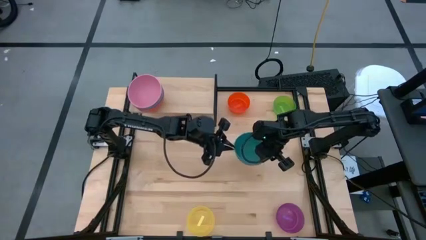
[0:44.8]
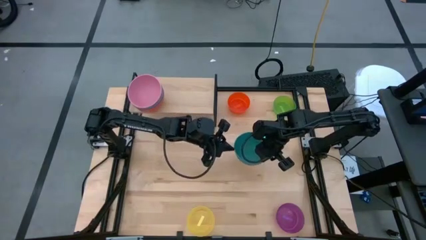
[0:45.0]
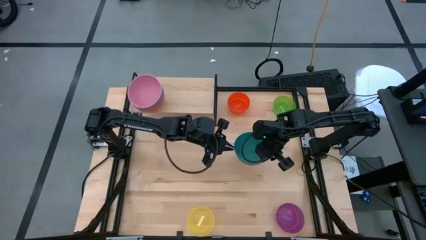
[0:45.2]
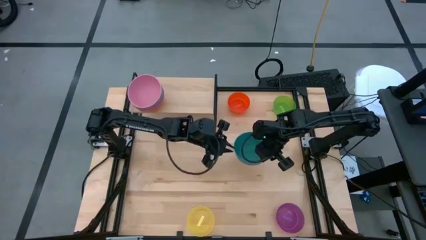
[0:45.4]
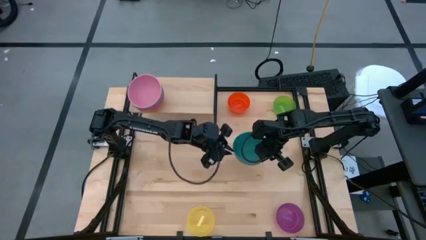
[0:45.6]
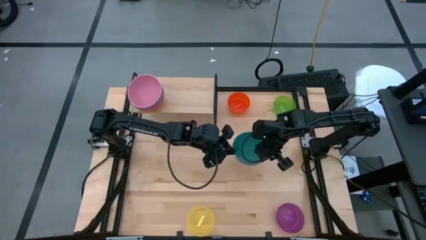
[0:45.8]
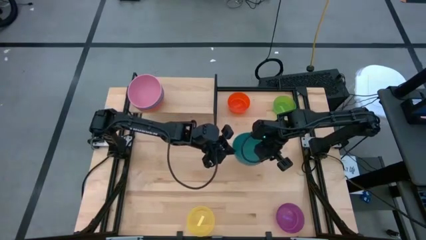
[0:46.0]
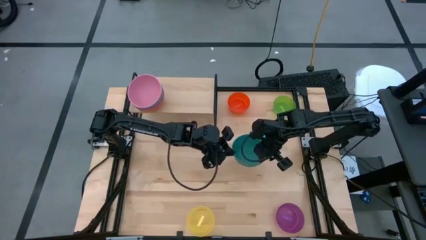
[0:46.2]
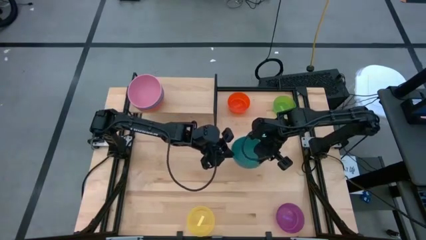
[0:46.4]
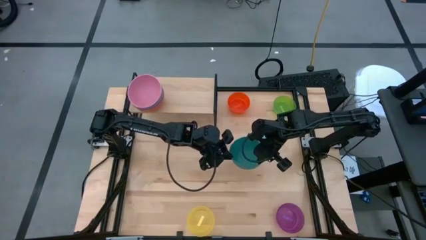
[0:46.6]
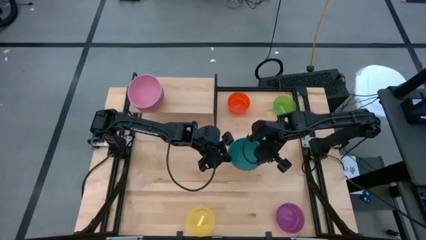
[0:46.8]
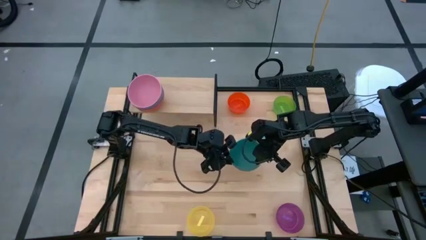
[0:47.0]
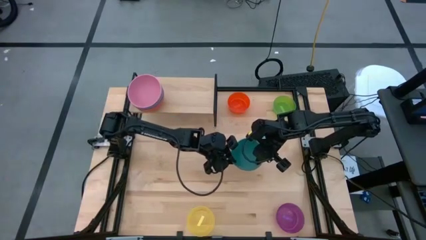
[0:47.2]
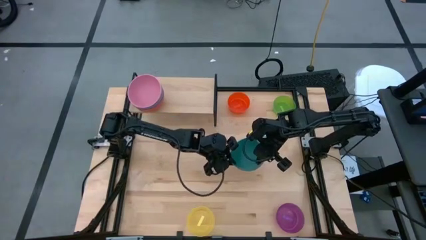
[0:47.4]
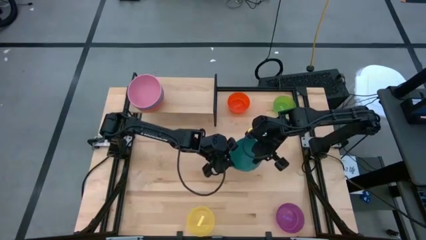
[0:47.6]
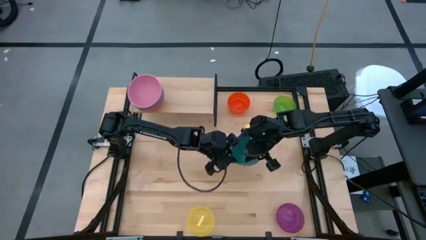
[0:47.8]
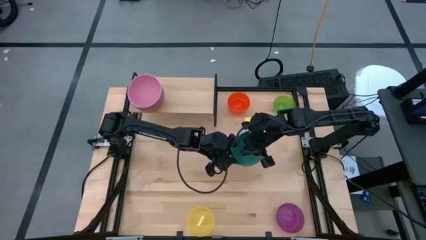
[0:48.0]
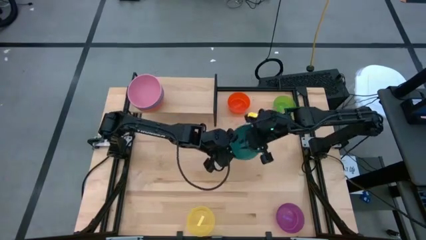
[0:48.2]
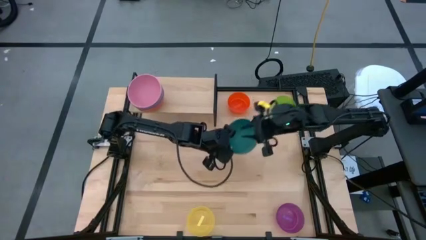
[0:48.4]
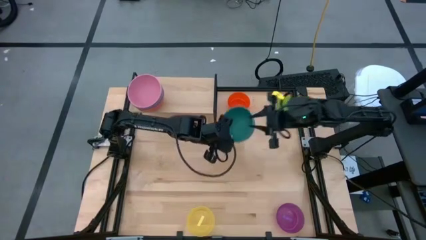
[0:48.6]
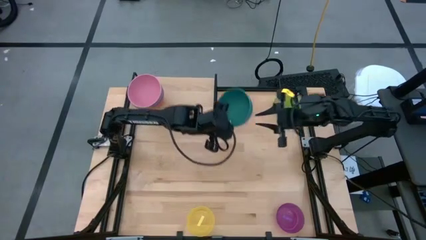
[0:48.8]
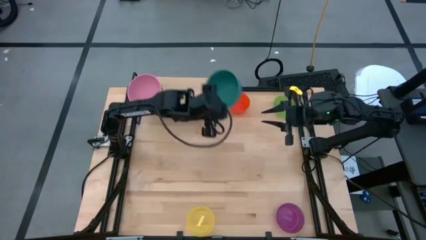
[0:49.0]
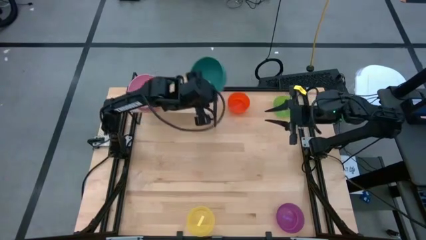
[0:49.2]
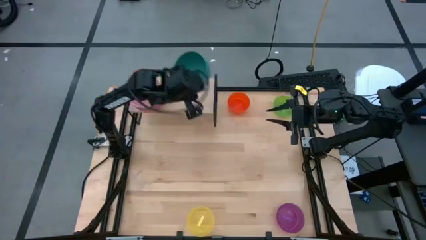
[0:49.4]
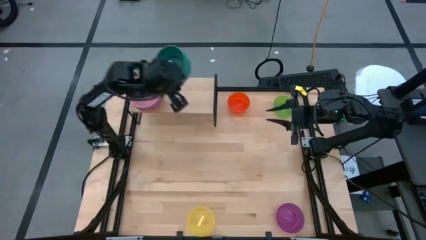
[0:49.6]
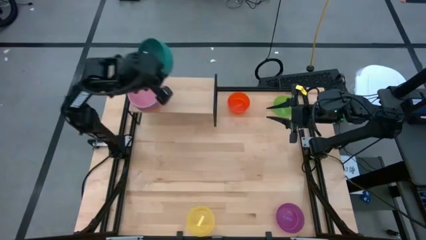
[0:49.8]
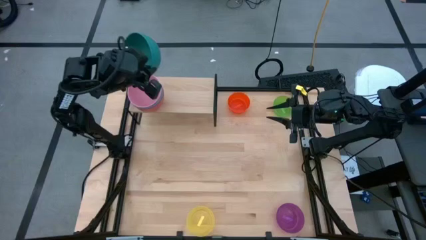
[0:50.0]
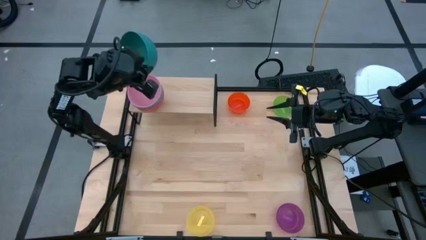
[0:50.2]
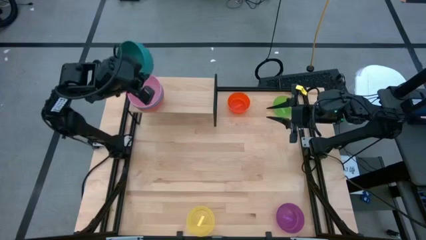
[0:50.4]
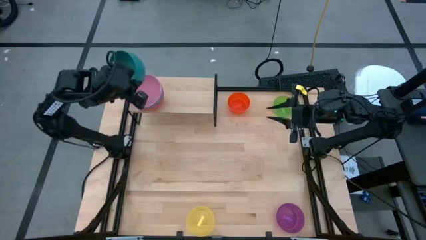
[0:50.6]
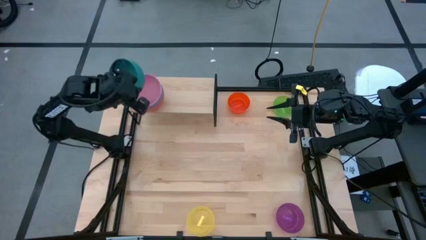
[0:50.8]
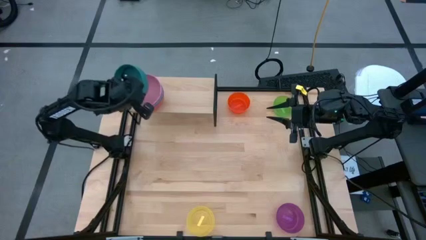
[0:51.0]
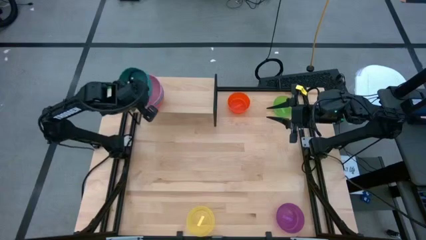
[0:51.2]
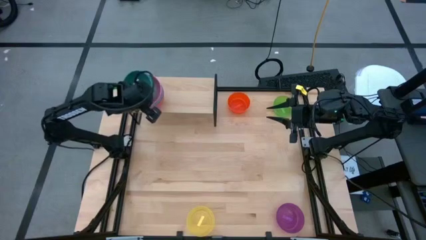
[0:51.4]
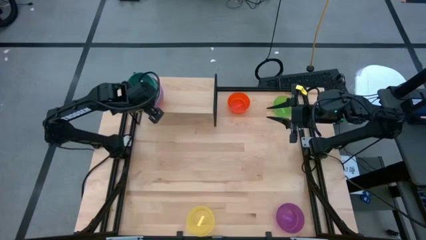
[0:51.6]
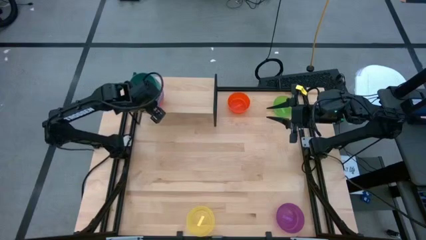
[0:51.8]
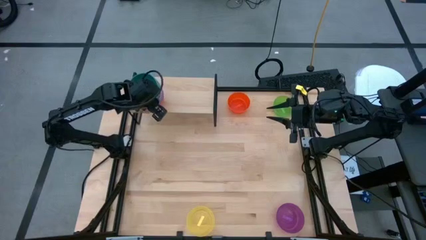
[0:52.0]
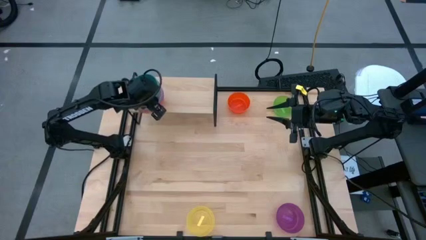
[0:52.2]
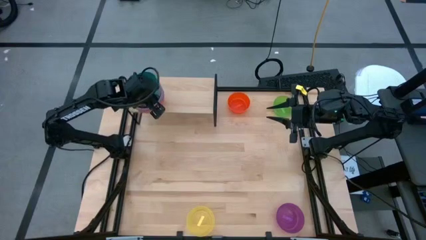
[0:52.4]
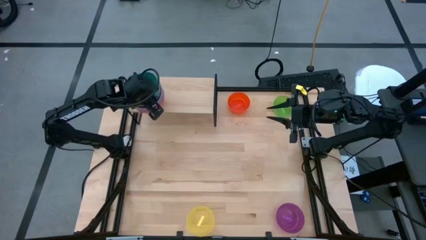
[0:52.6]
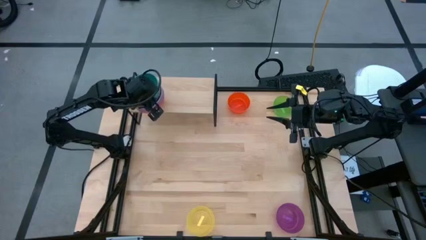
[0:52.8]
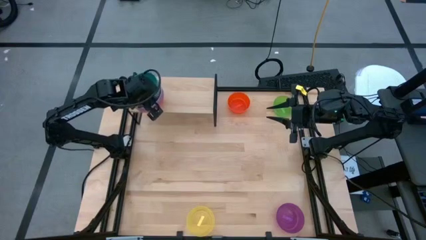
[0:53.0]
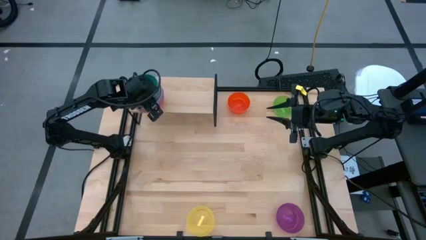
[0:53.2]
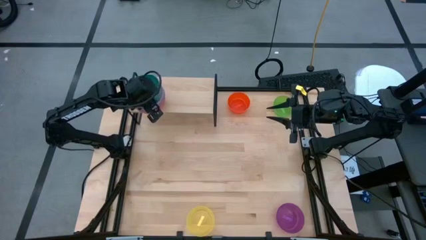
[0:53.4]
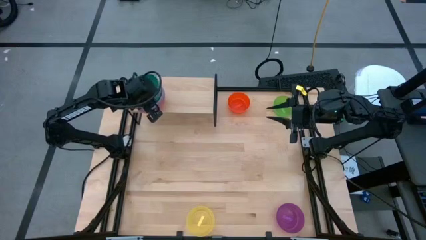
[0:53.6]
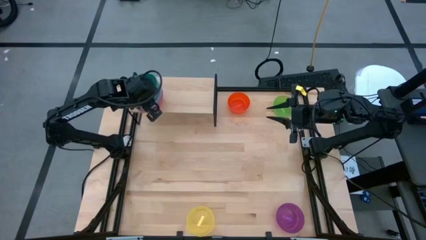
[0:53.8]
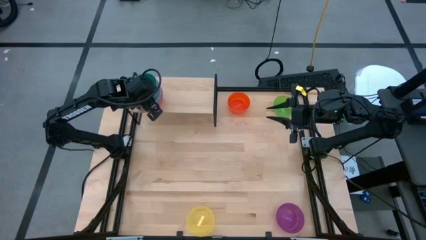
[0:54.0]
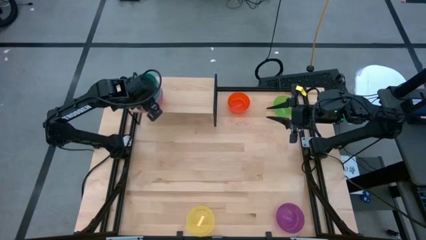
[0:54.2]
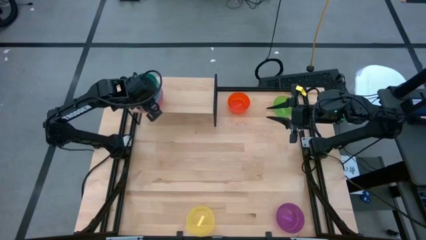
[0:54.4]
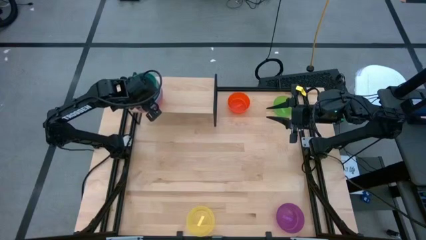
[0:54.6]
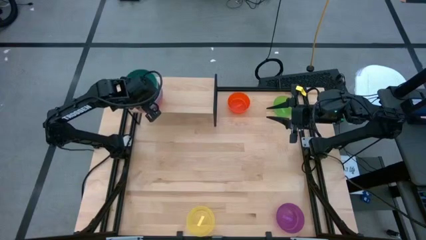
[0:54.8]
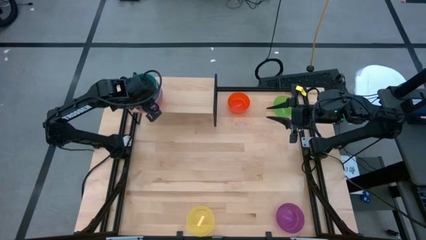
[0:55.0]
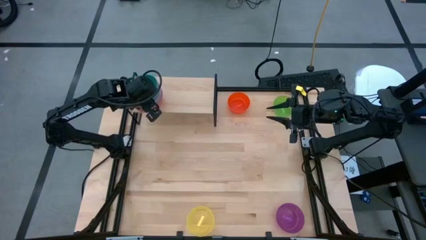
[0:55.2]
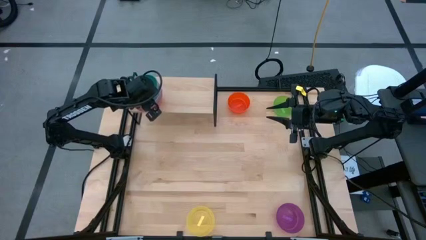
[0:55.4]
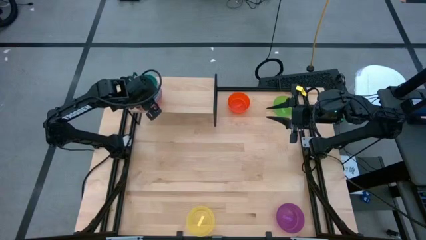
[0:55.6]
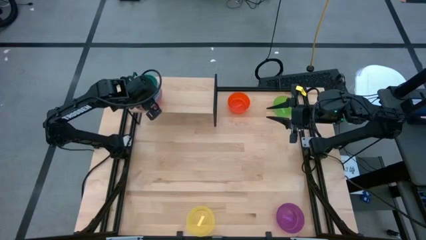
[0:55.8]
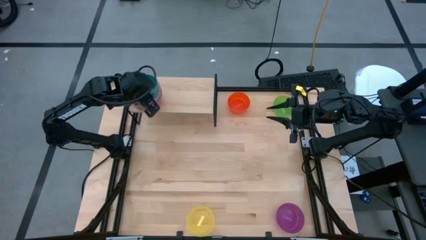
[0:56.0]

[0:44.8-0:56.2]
Task: Place and stack bowls onto a shelf
Stack the green bowl on top of the pink bowl on the shelf

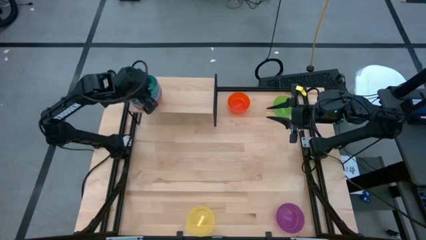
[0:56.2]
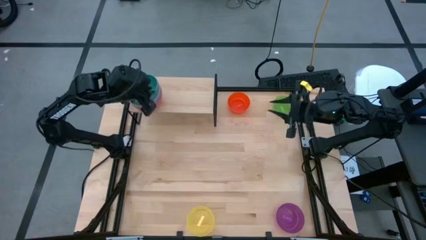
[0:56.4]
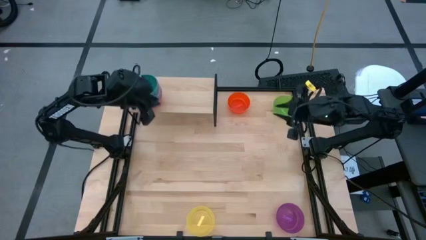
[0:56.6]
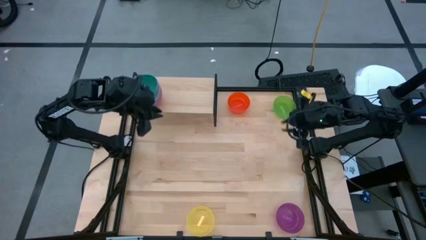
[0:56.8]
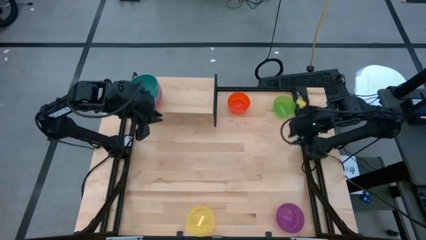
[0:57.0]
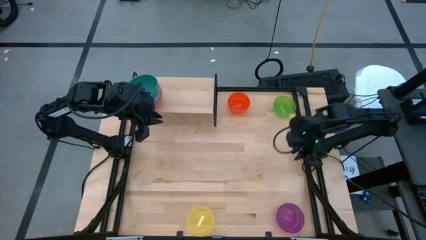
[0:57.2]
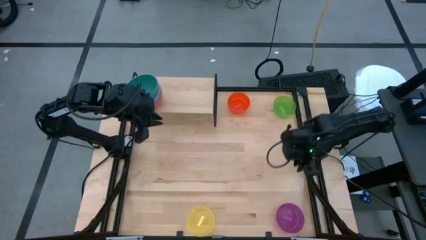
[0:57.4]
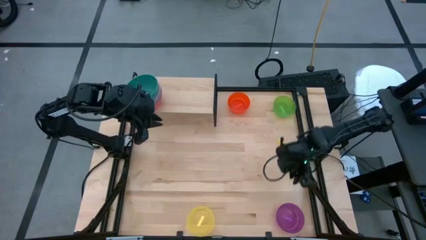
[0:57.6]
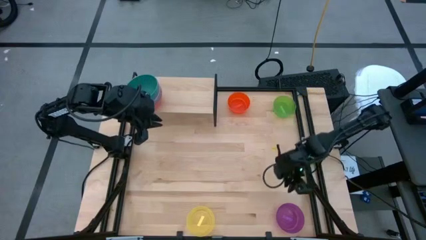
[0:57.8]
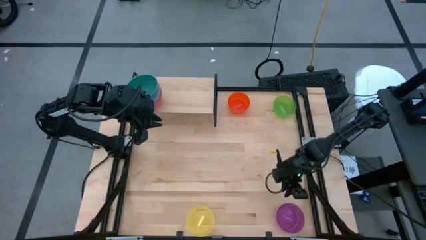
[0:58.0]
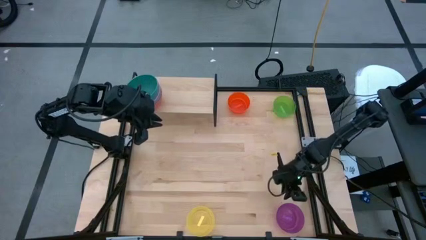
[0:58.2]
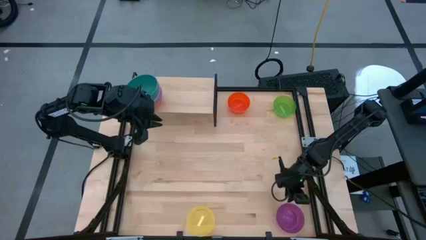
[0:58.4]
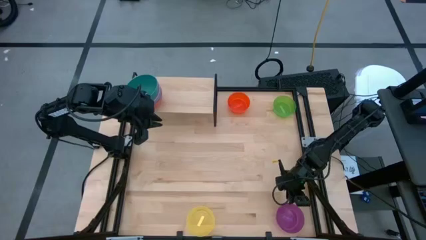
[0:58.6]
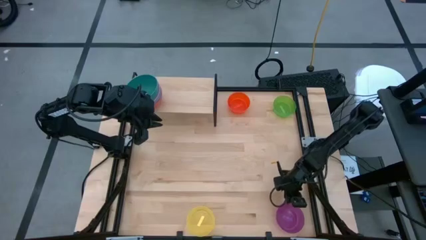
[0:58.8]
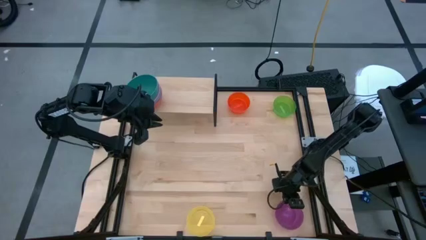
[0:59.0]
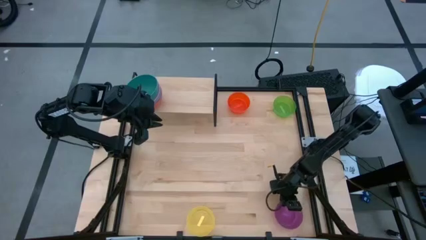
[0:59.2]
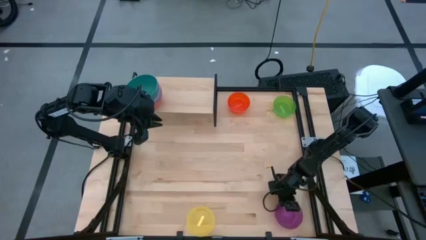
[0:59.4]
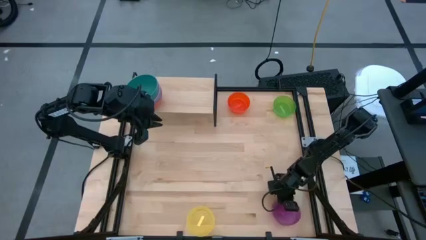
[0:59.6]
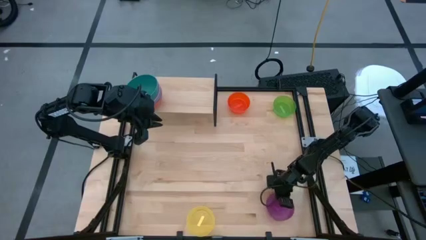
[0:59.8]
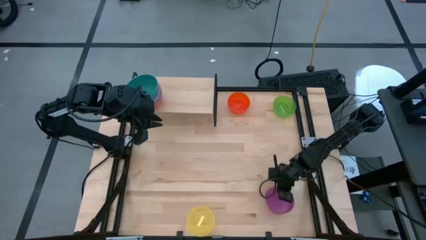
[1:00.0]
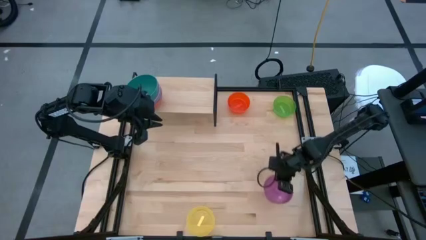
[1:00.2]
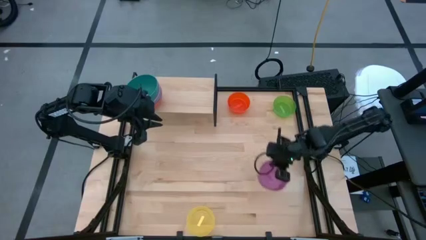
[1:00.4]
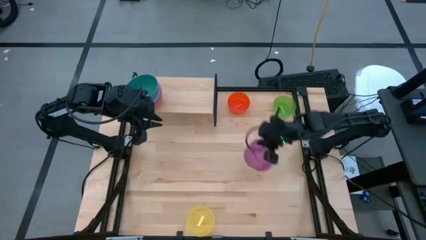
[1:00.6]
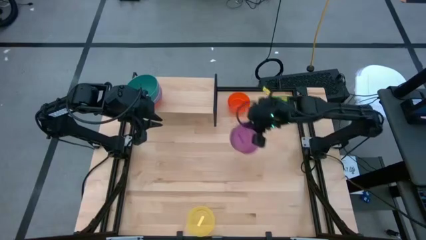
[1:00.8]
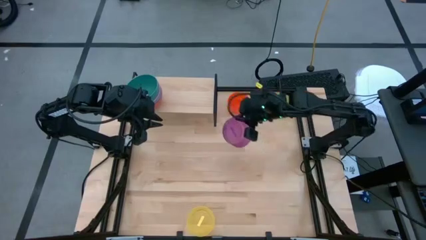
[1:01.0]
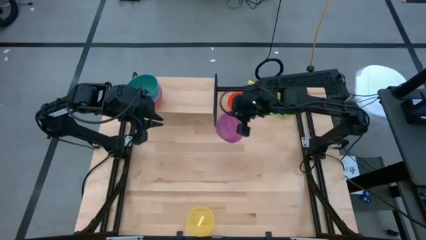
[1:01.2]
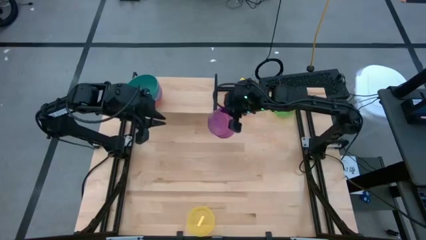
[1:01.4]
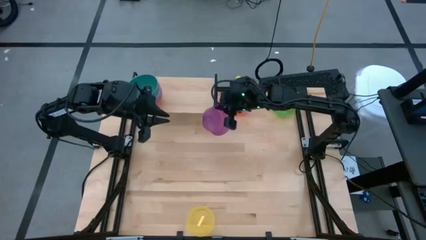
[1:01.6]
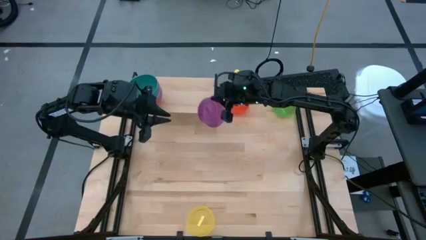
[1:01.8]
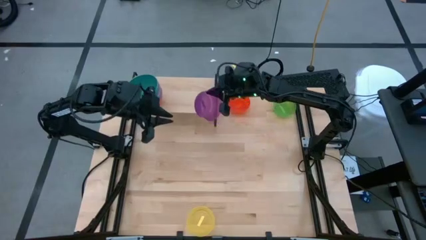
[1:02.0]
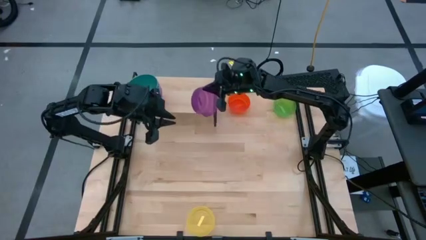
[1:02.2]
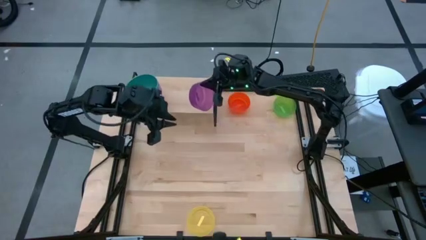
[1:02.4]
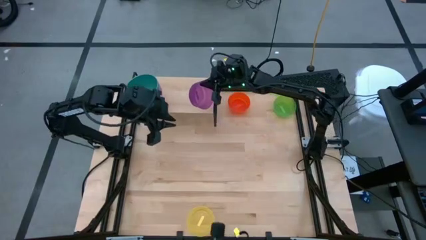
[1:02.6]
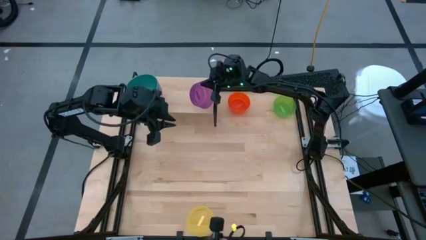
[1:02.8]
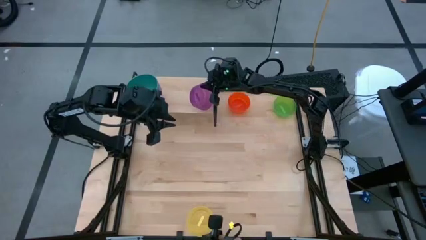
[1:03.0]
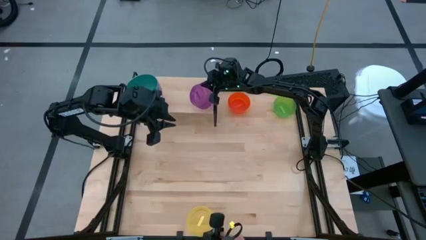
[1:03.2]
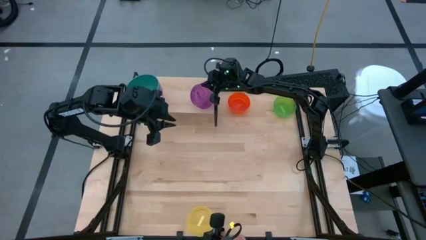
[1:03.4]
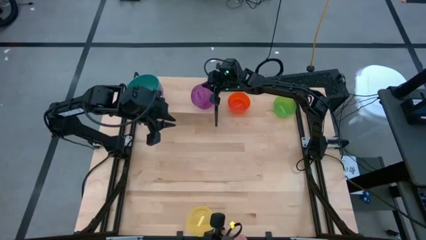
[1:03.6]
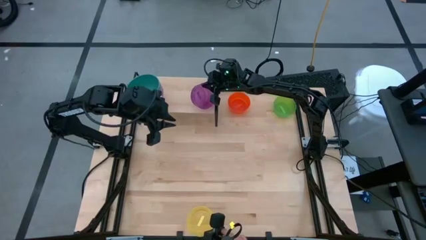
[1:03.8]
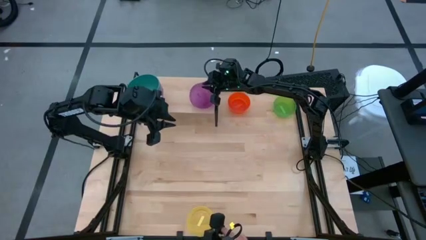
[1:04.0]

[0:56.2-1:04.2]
Put the purple transparent bowl on the shelf
